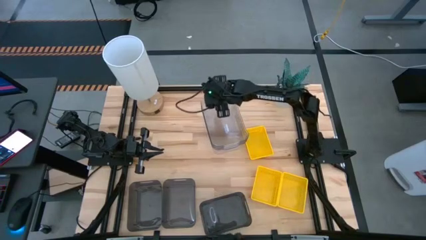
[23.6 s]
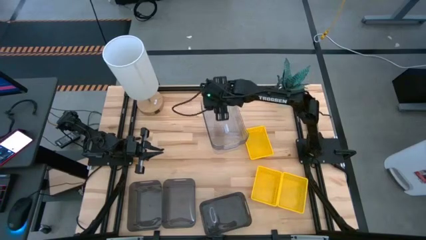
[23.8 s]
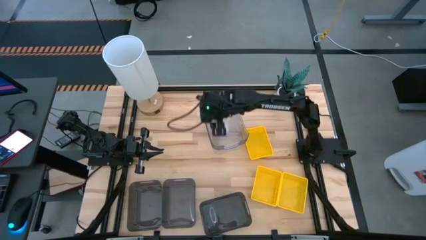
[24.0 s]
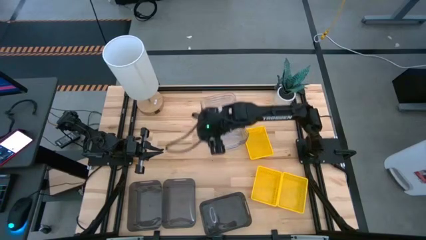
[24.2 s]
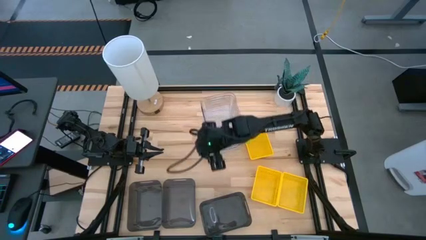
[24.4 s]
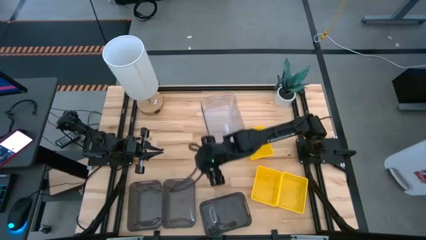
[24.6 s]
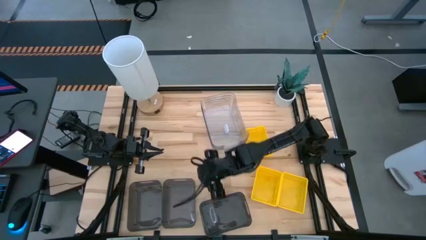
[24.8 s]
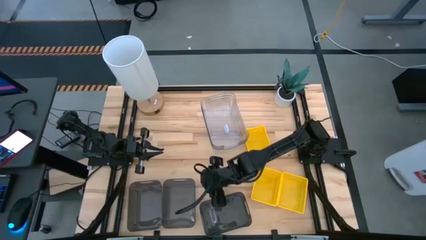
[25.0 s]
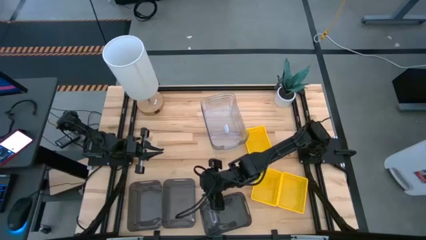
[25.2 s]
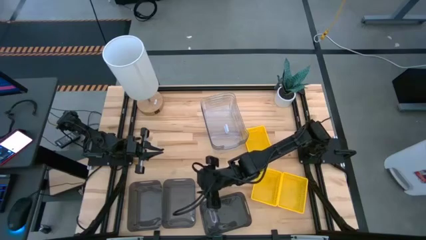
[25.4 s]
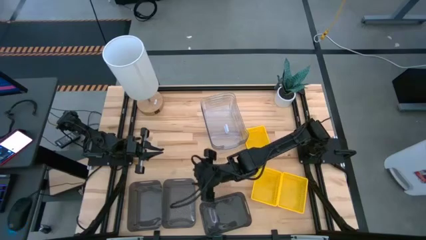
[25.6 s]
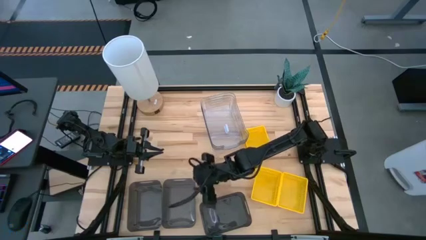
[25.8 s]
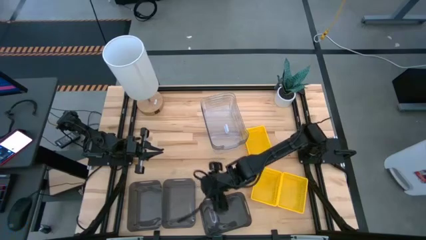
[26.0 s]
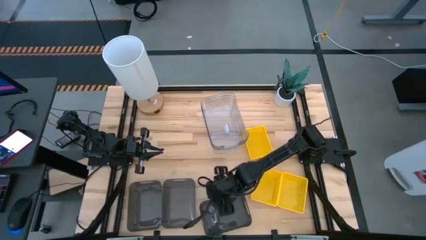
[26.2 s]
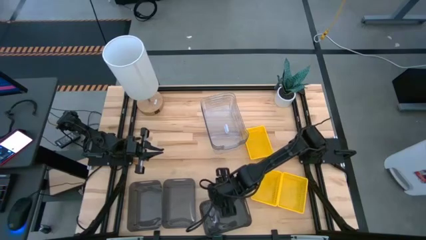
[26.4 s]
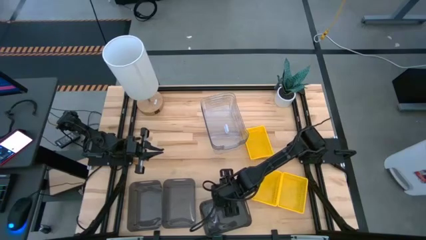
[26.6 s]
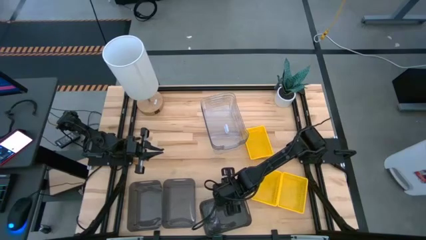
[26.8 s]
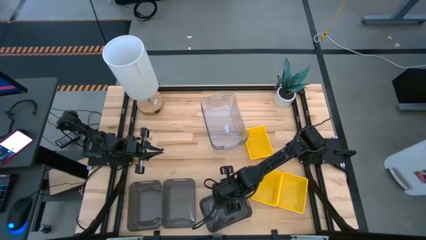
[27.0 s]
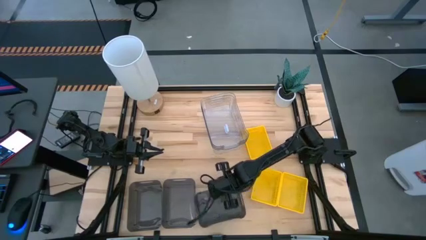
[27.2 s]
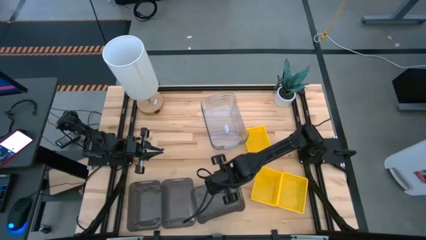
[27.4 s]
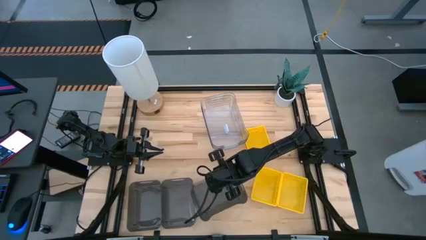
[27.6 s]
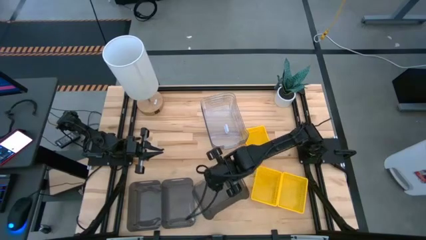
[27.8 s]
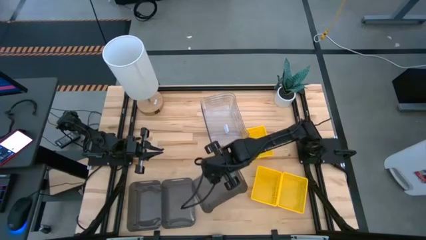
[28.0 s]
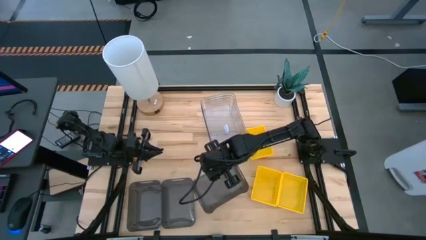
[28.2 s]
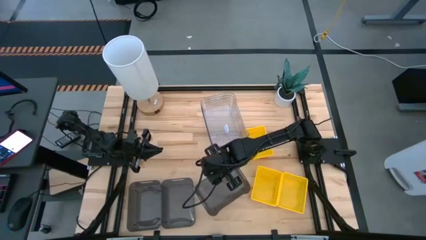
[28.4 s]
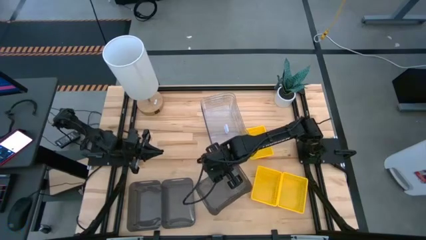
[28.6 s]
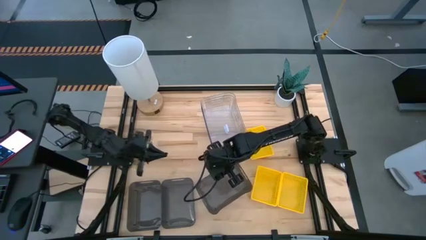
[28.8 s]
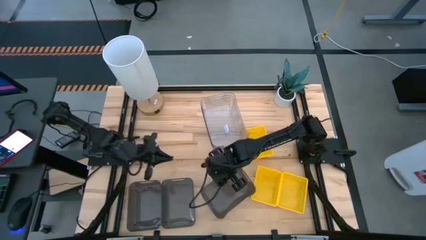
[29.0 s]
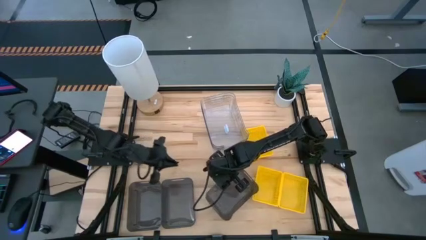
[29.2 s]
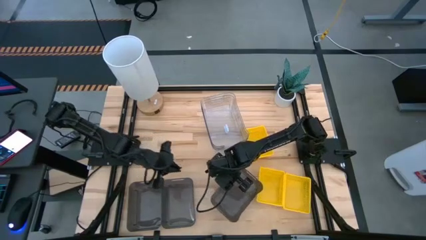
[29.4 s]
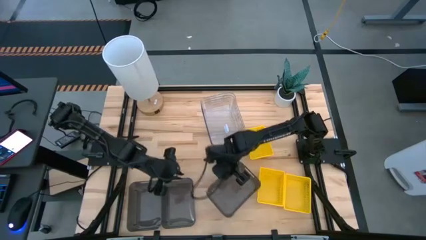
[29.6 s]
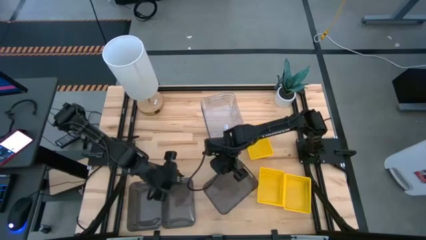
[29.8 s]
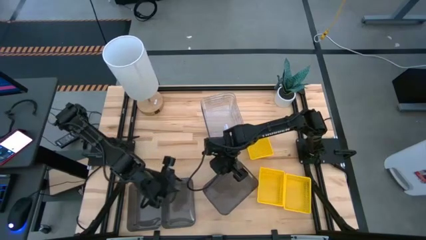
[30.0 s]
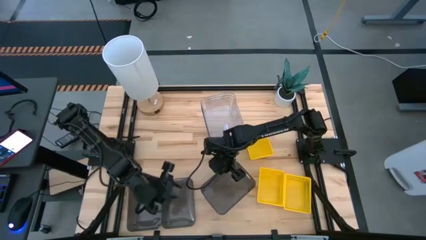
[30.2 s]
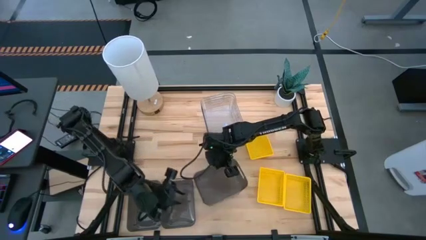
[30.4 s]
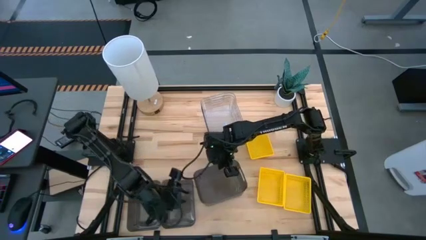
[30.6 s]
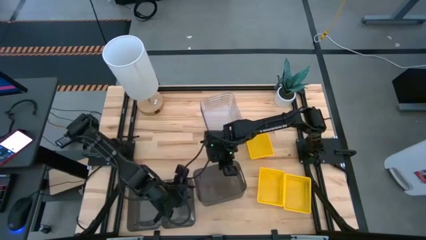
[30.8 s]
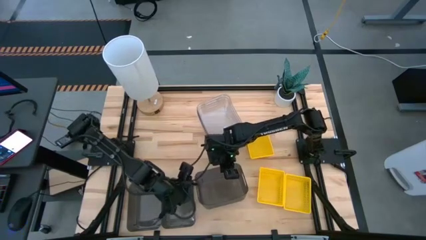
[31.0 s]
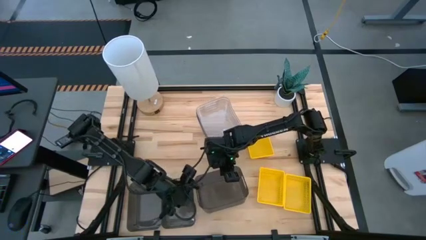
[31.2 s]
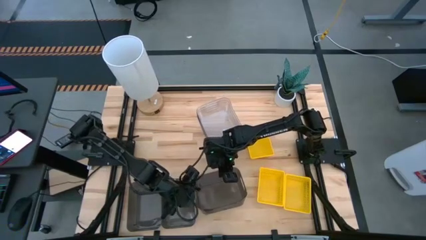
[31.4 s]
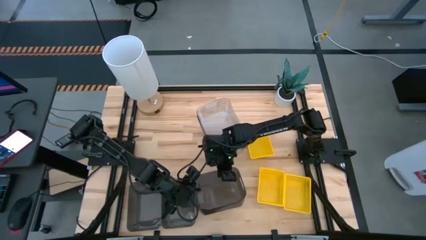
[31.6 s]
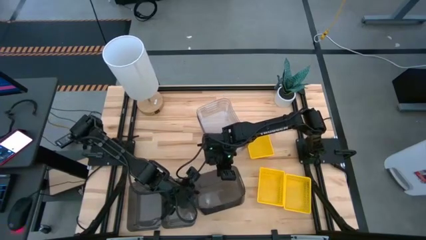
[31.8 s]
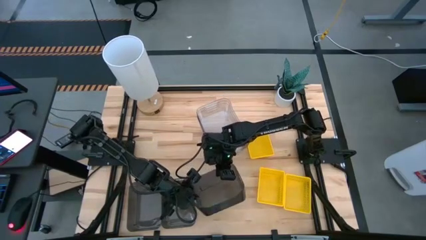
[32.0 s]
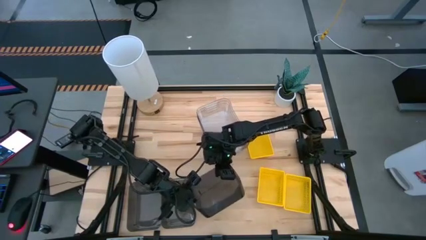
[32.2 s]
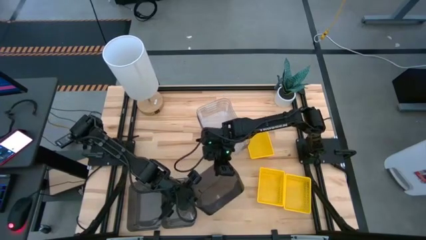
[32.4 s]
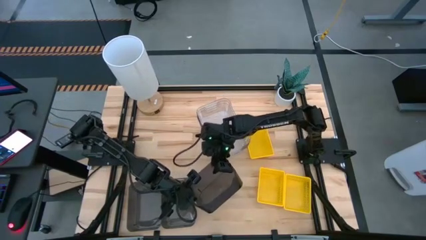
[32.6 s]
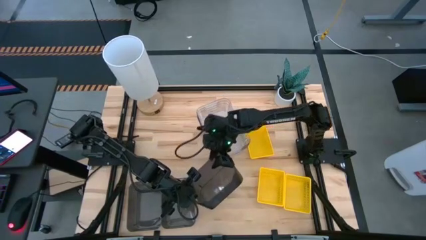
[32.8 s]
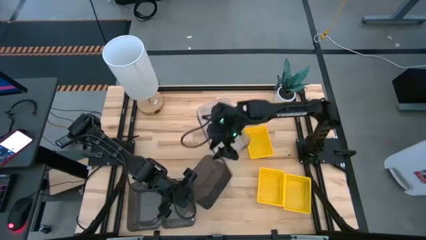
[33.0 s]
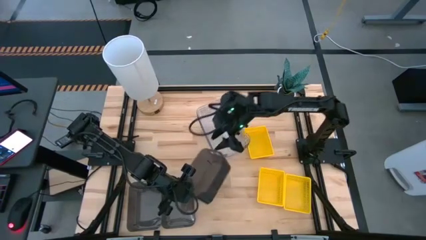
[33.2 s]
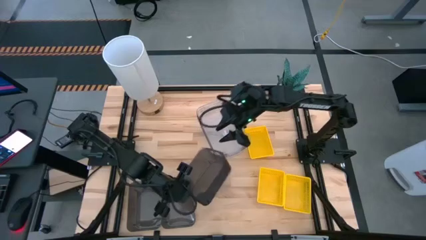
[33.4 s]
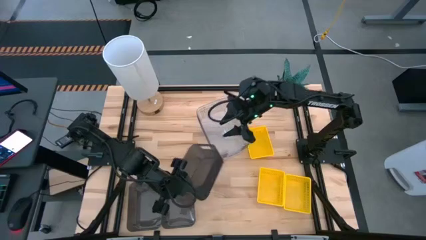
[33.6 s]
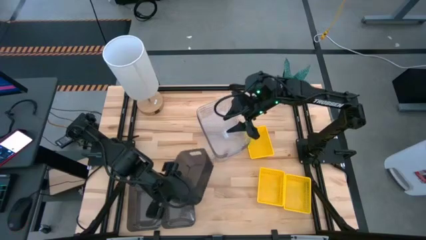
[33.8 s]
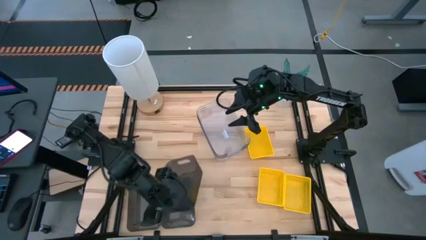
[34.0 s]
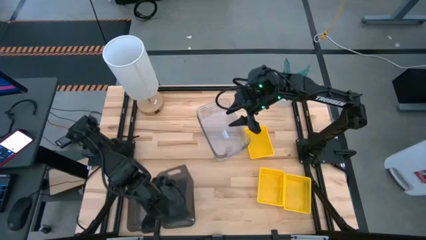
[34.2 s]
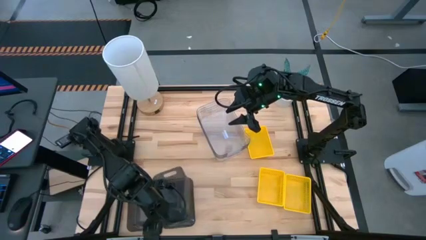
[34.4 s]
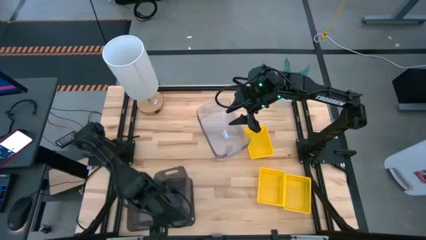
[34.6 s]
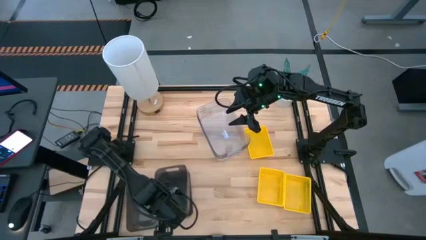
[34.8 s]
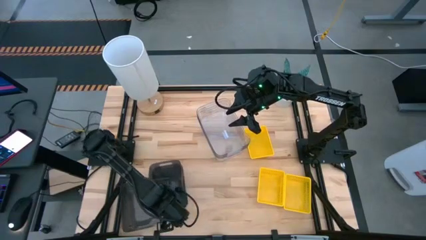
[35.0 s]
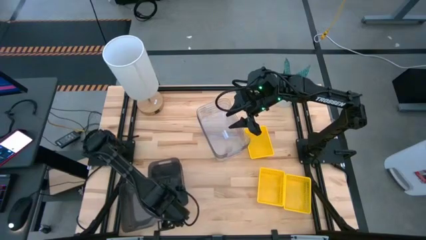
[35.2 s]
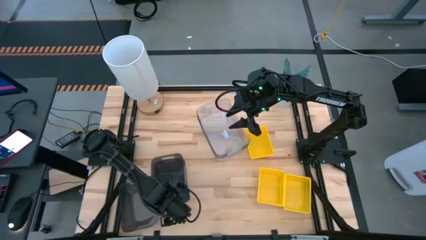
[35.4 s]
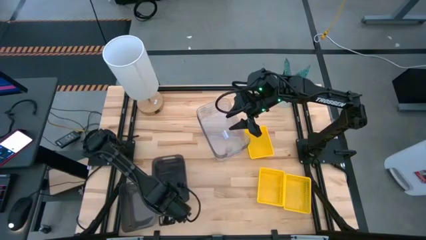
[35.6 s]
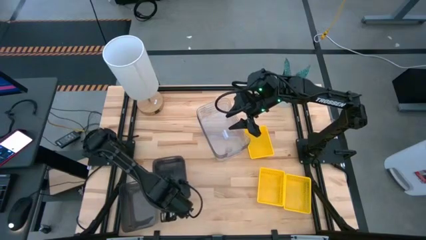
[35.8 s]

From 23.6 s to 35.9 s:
Stack the right black bin on the top of the middle black bin

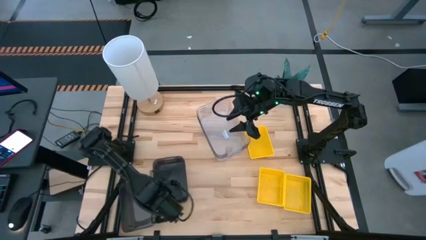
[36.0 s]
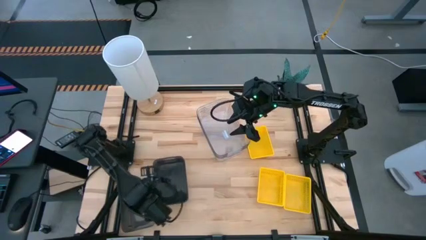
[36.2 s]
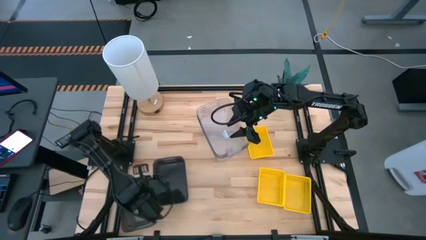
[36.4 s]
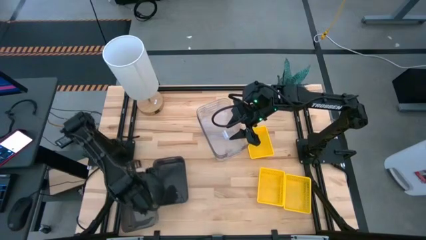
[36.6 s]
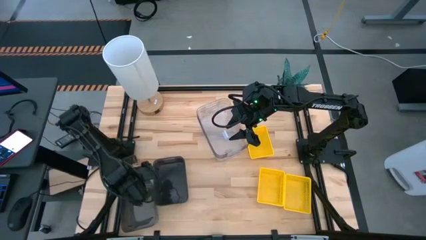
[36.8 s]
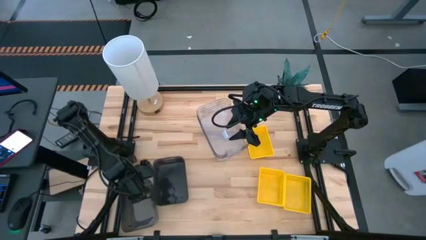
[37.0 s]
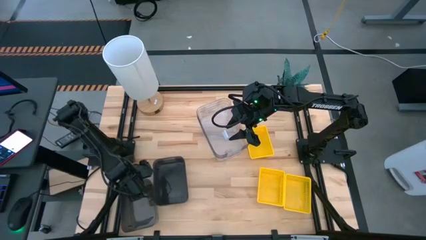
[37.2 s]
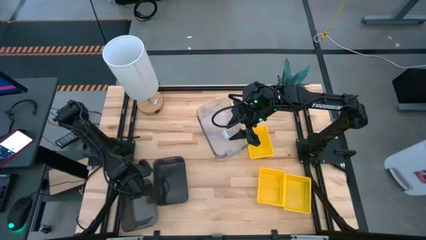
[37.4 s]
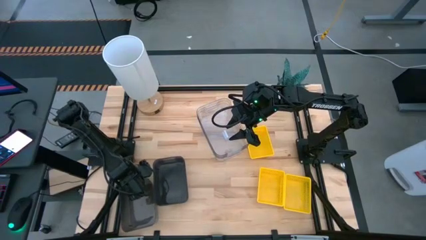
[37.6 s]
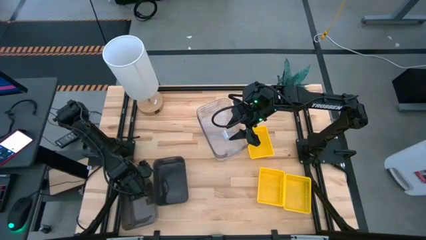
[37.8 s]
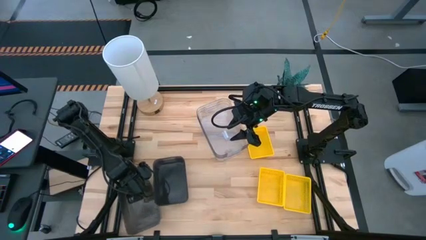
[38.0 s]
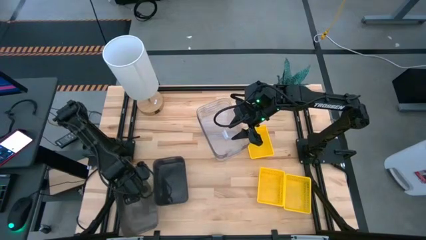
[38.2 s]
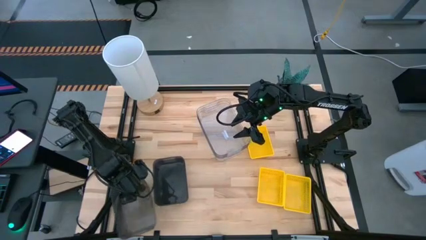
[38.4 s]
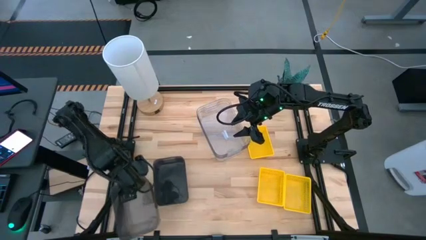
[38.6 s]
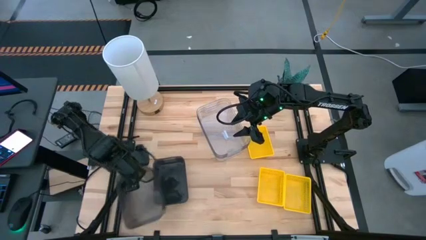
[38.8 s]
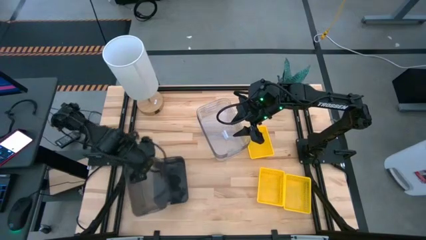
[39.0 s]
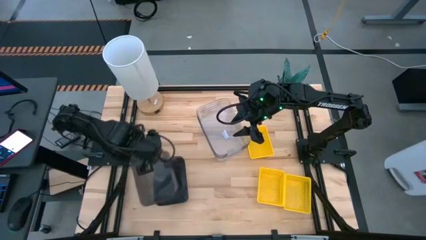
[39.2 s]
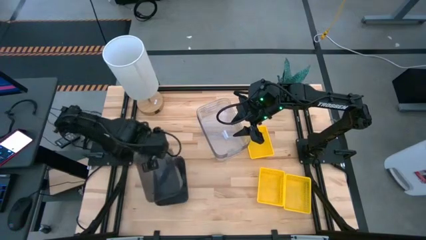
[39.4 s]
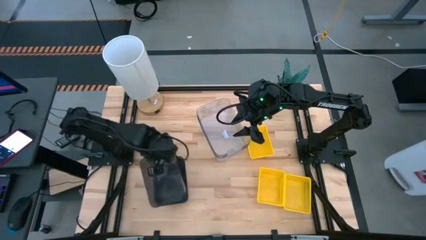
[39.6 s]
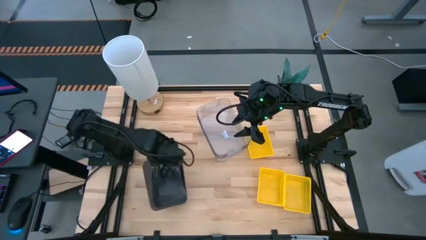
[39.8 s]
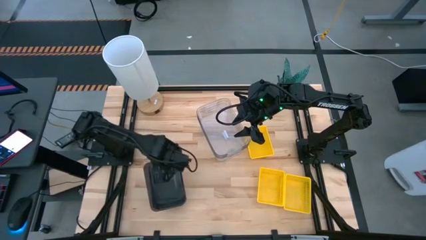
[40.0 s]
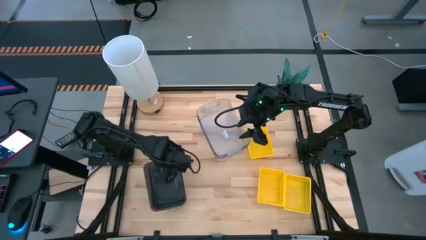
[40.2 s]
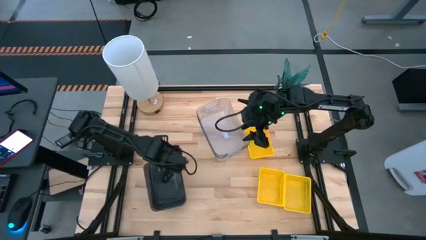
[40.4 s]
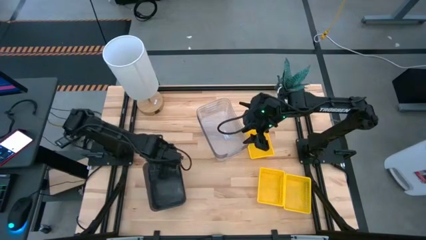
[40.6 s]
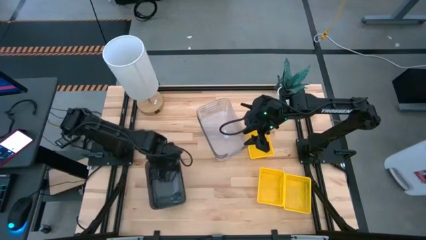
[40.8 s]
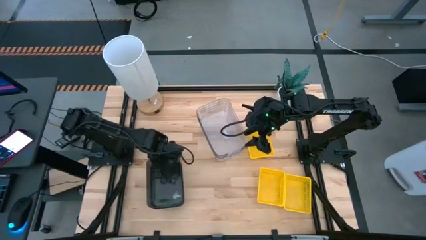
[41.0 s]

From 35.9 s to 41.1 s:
Stack the black bin on the top of the stacked black bins
